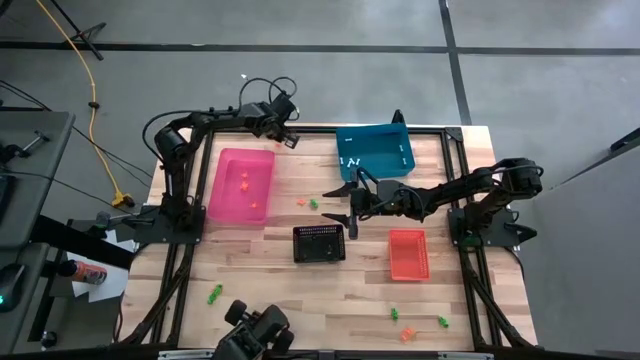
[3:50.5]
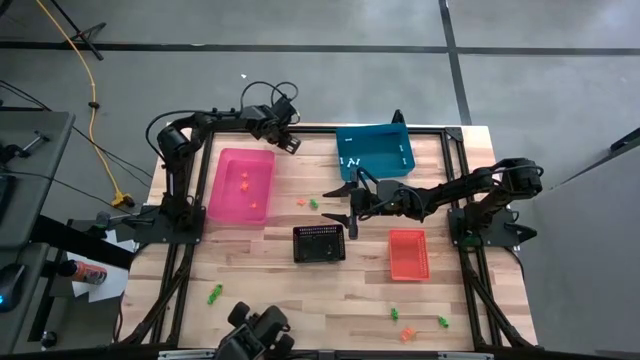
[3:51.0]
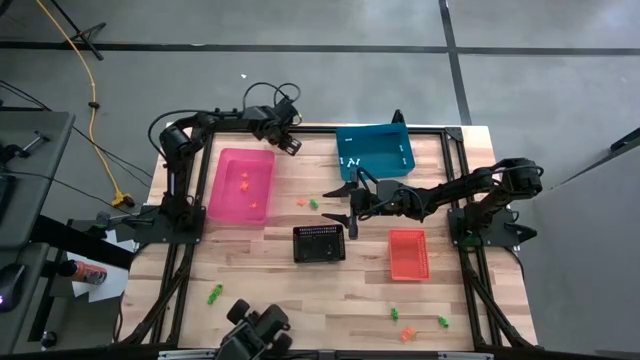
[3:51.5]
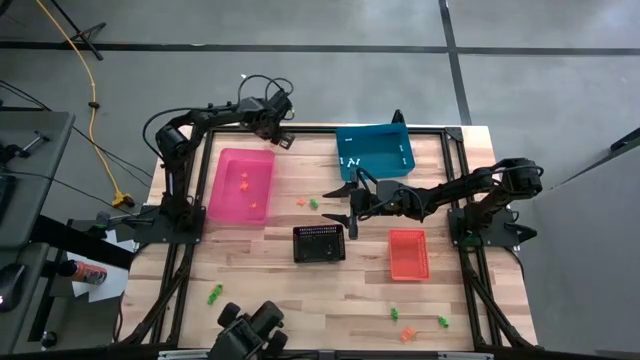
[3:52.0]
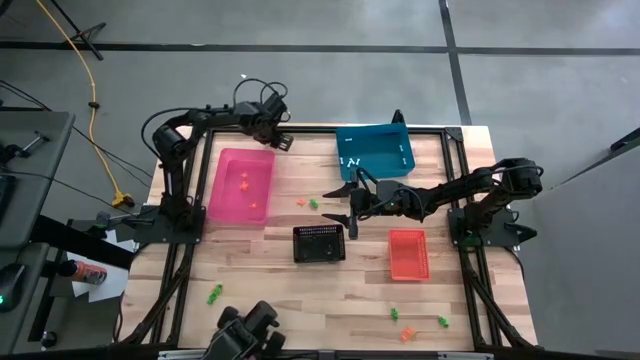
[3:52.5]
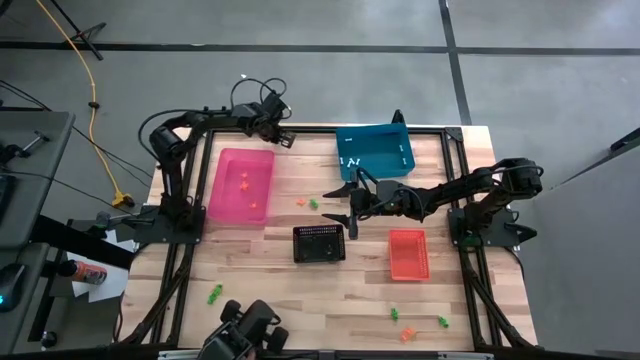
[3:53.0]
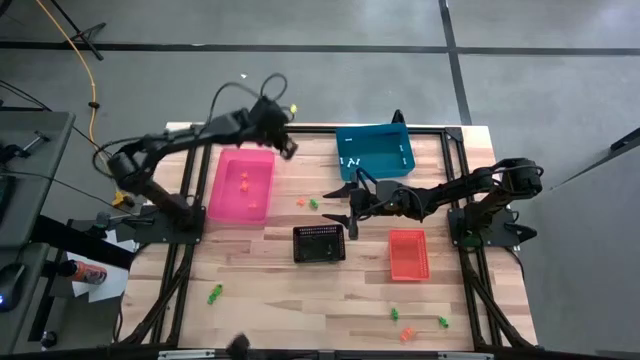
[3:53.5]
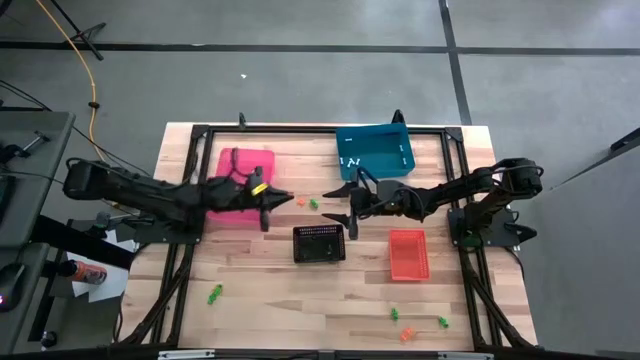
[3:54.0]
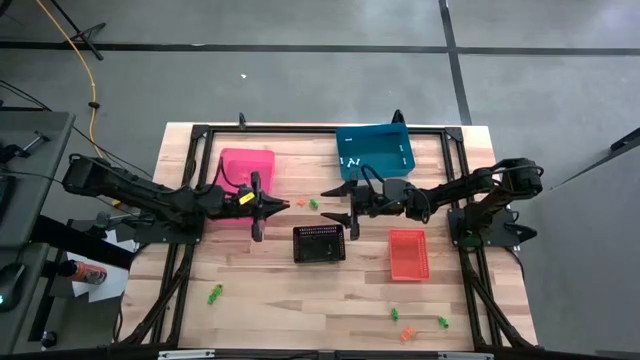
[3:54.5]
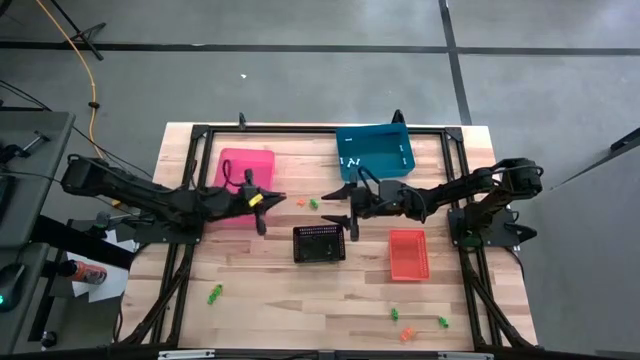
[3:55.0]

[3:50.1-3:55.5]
Task: Sort Halloween decoration
Put the orange spider toy into the pink bin

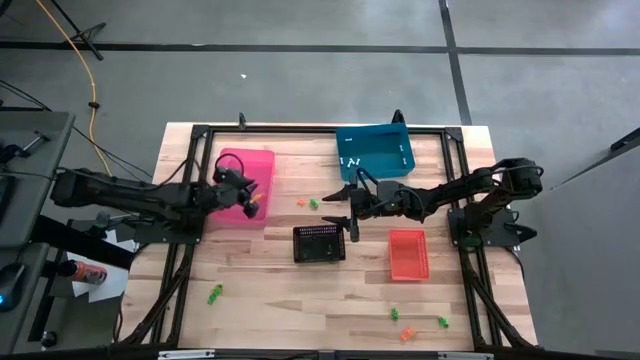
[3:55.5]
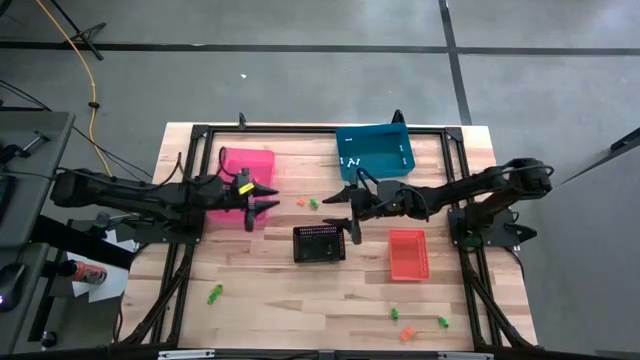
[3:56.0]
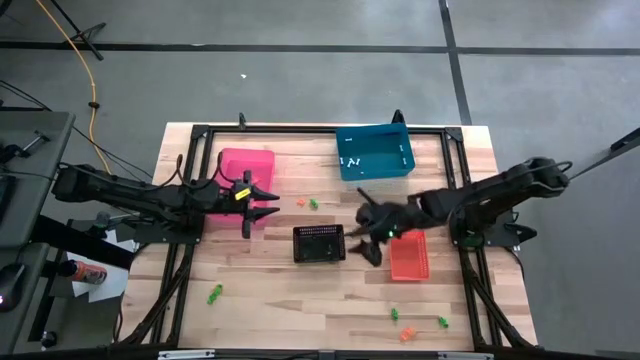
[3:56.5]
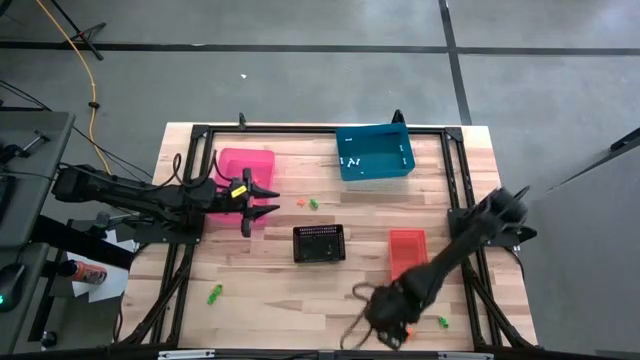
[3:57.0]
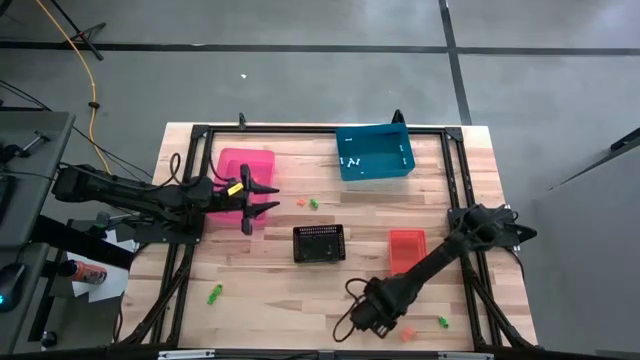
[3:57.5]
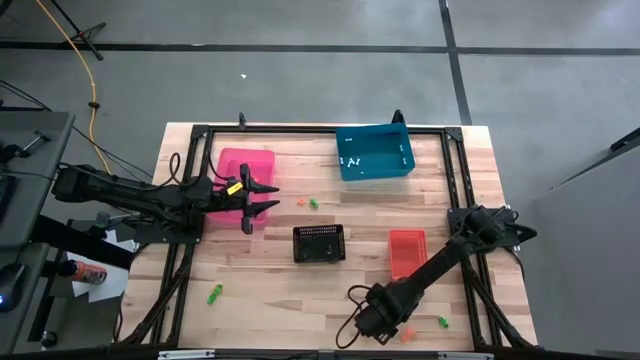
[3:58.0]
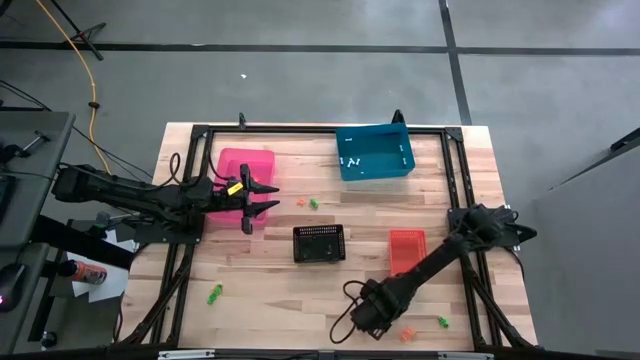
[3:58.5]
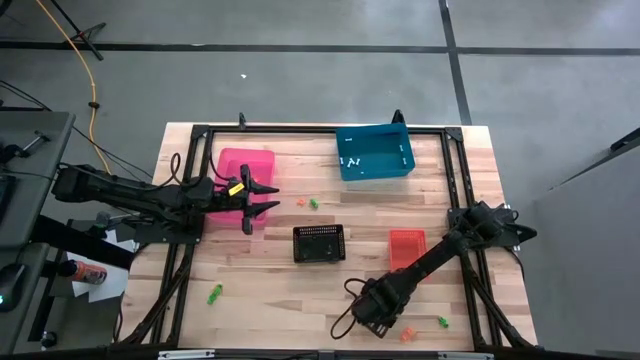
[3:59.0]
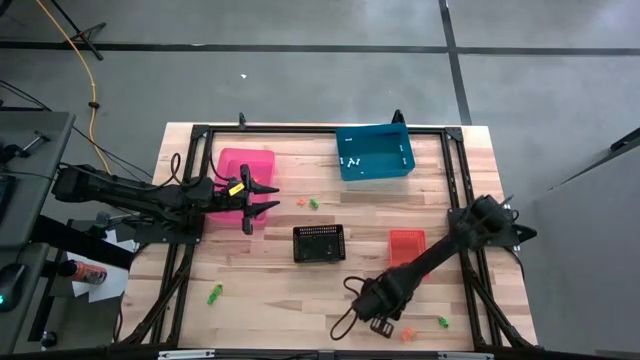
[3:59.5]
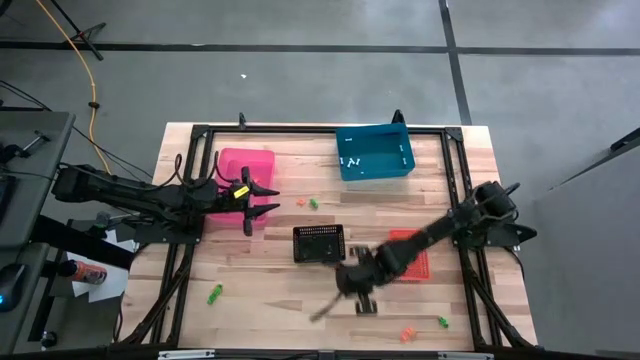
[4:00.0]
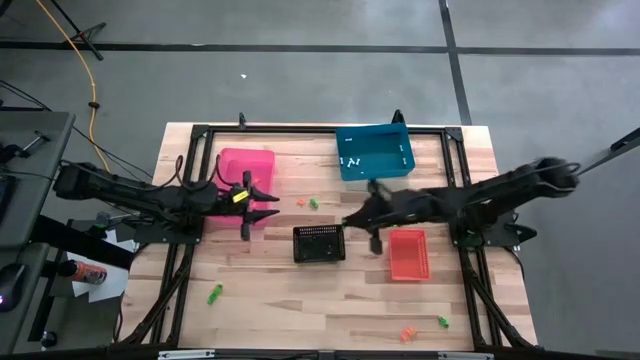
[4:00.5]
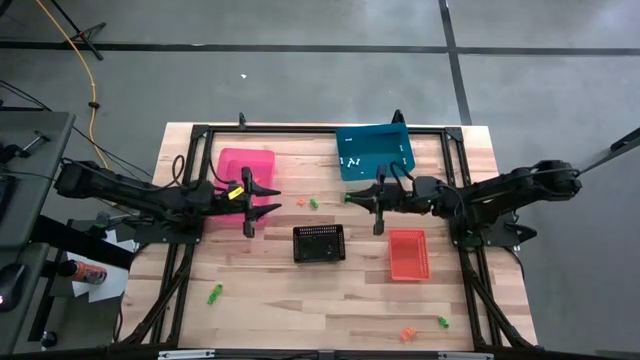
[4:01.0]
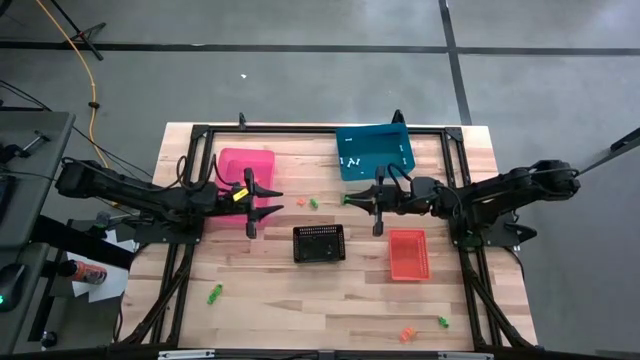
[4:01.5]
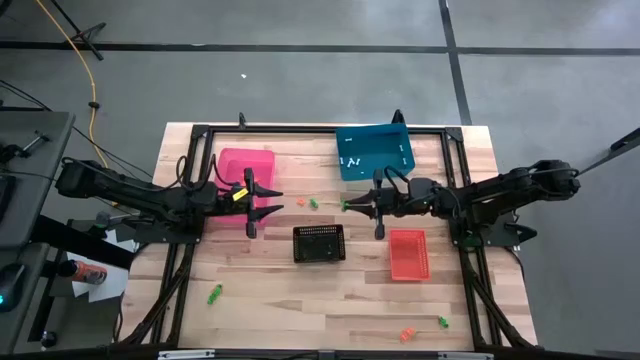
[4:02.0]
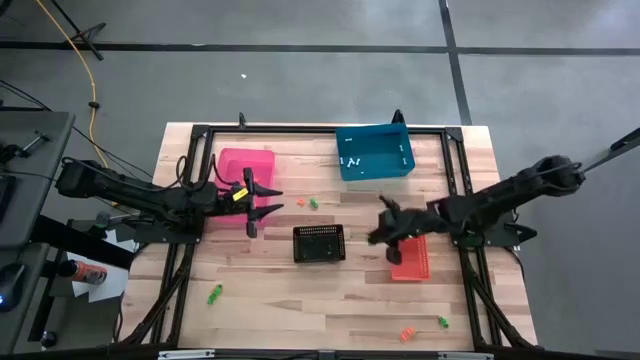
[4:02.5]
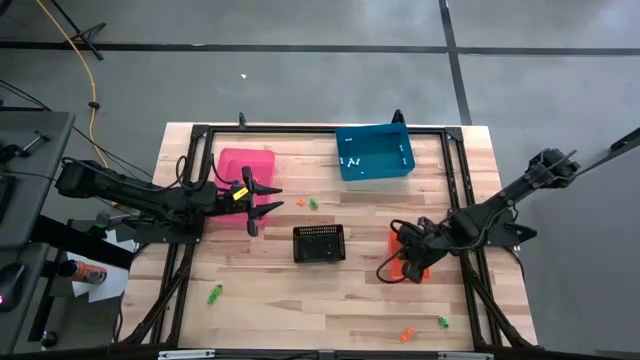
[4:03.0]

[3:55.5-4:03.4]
Put the green skeleton toy into the orange bin

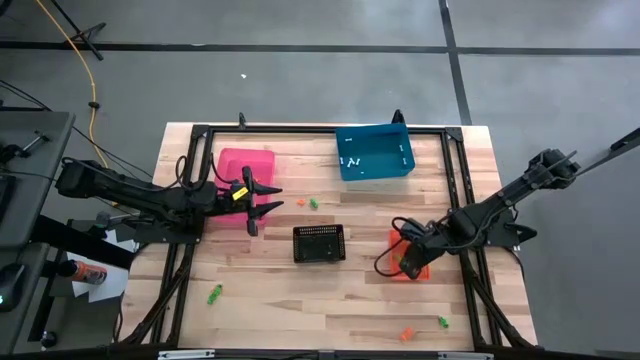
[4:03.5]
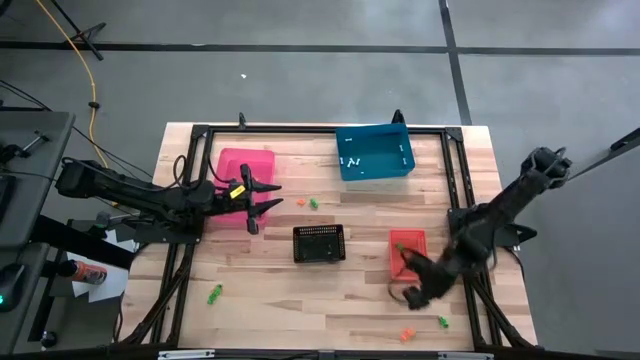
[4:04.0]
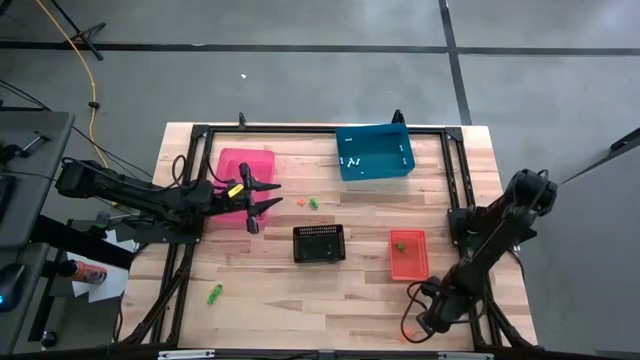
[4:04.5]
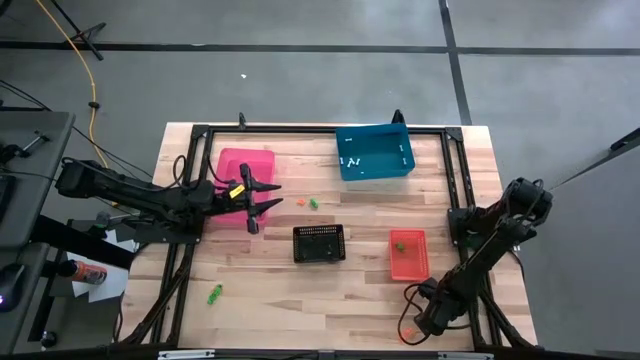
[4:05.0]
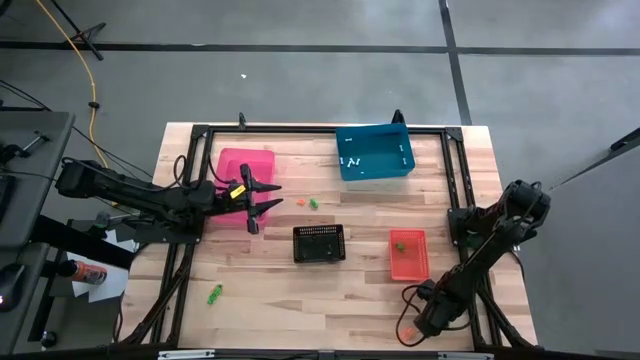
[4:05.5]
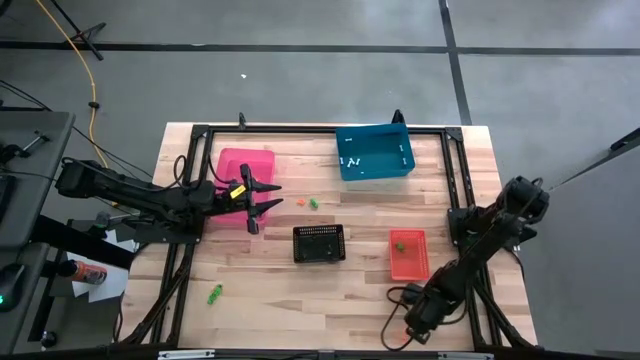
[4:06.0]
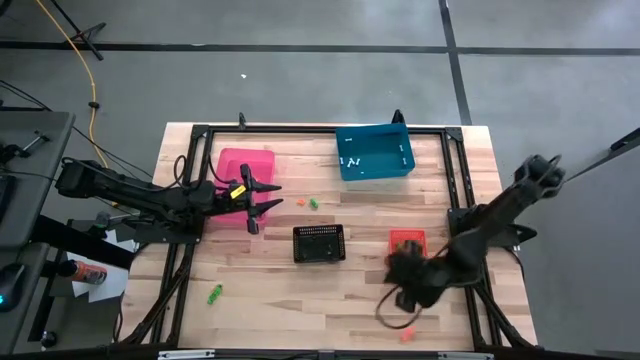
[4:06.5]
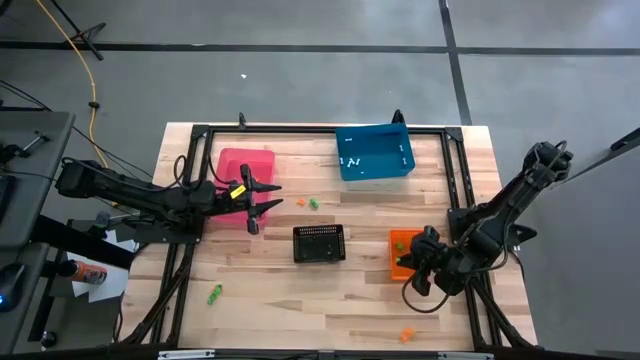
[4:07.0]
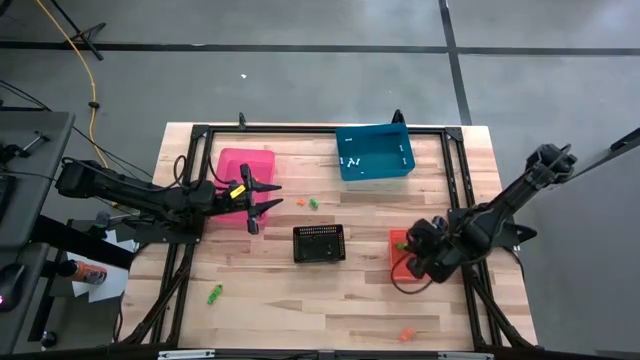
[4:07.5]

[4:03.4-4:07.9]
Put the green skeleton toy into the orange bin

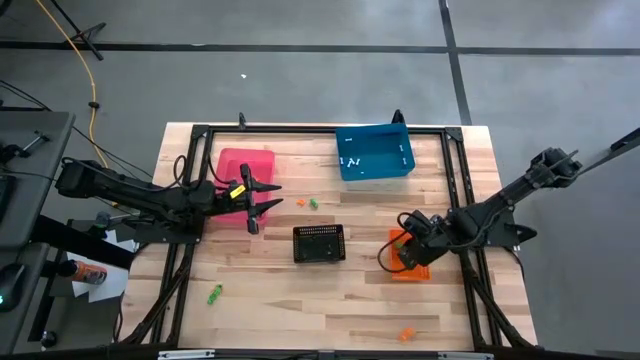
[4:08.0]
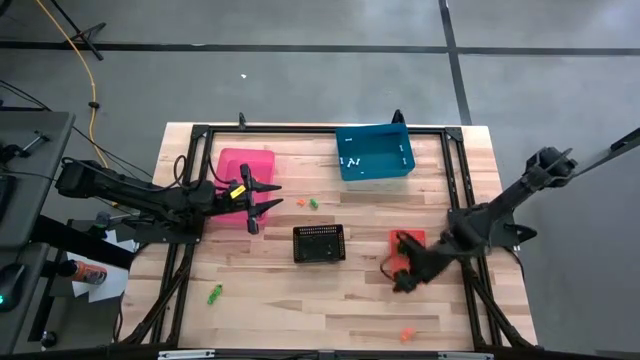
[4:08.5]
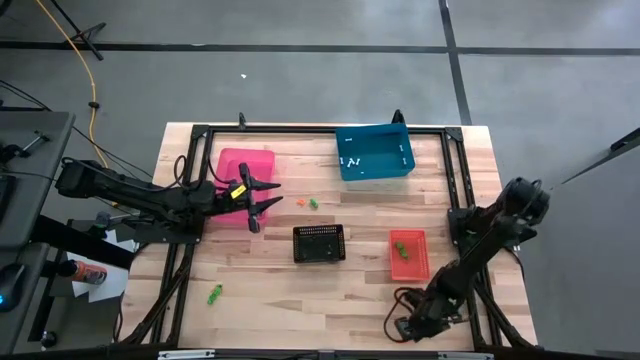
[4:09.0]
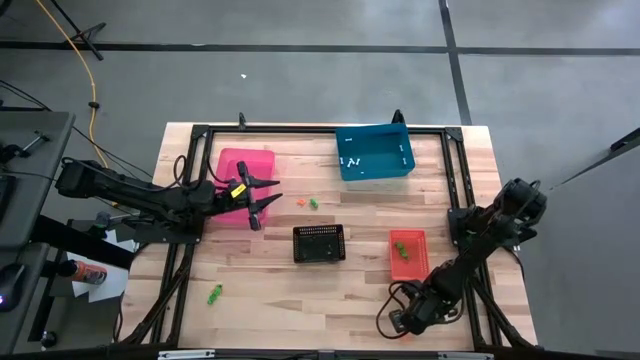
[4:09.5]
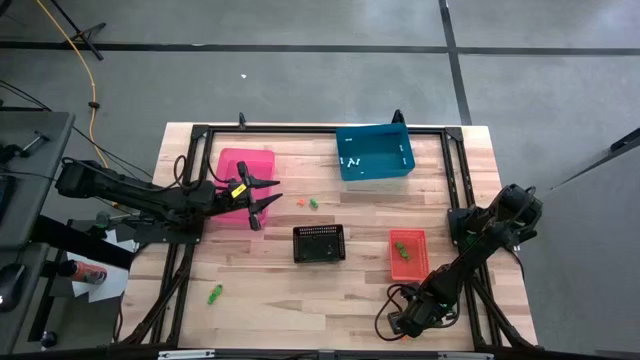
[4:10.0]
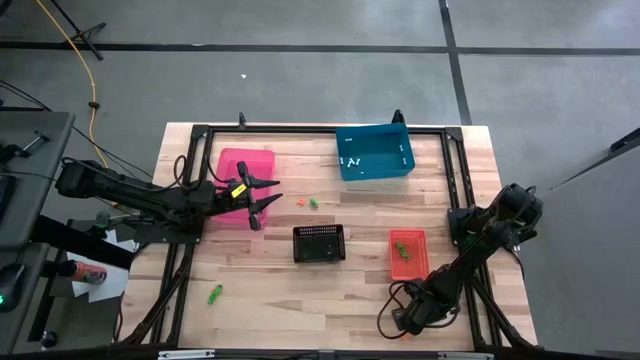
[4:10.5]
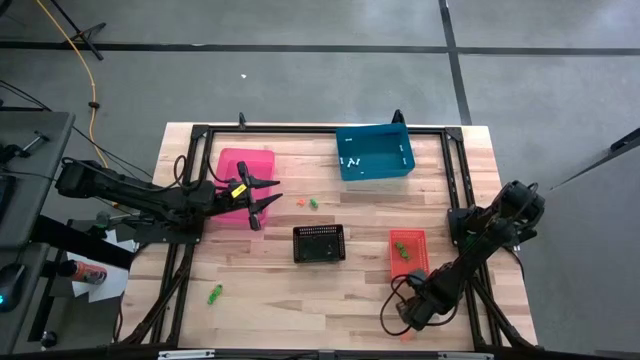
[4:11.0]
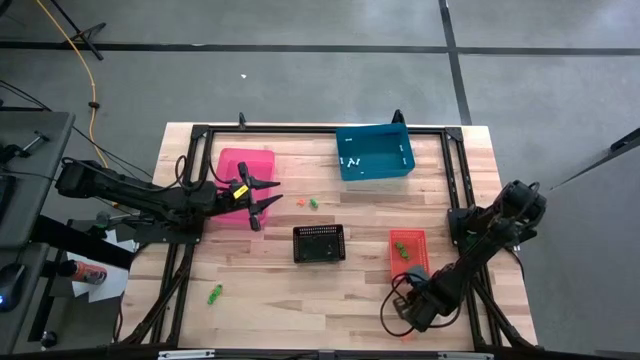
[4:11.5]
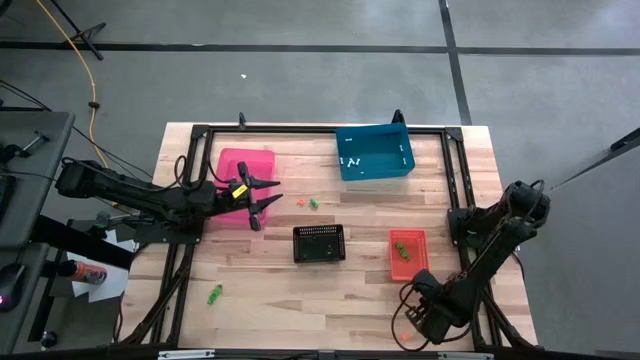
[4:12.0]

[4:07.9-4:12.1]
Put the green skeleton toy into the orange bin
